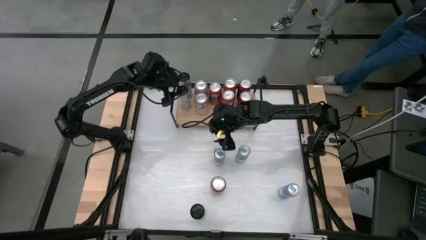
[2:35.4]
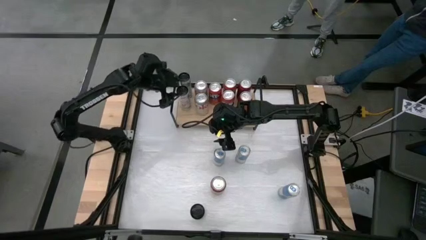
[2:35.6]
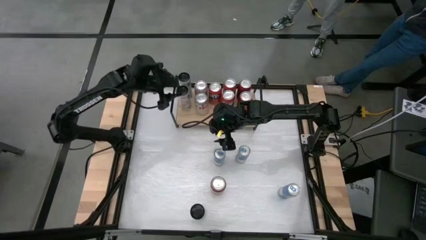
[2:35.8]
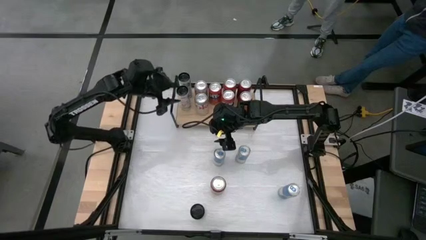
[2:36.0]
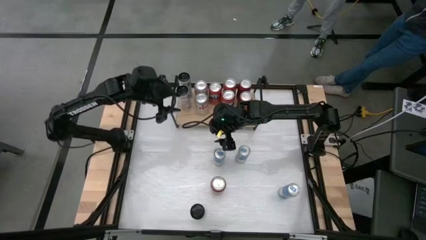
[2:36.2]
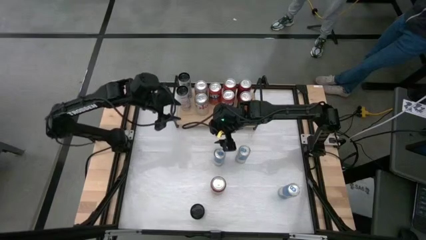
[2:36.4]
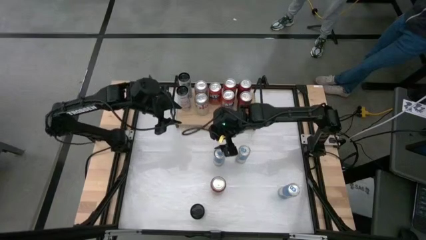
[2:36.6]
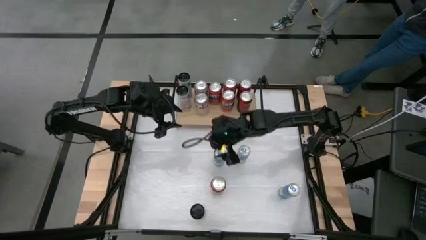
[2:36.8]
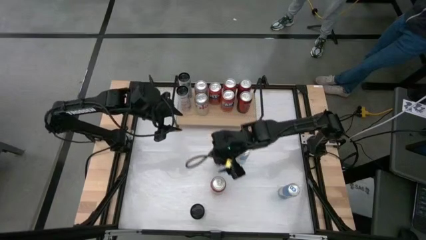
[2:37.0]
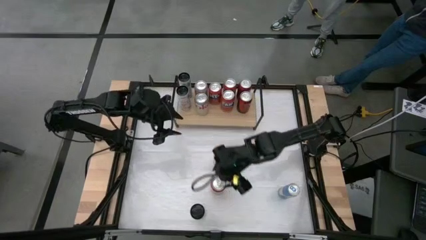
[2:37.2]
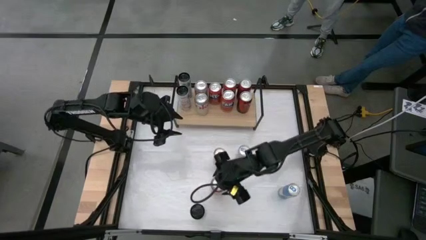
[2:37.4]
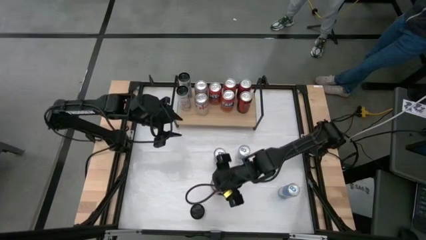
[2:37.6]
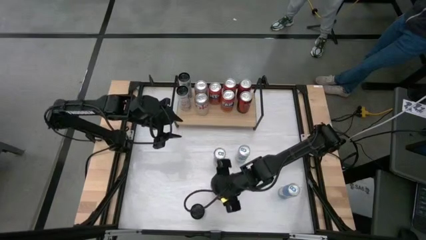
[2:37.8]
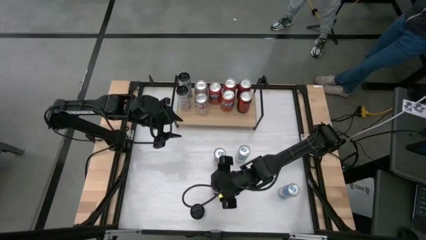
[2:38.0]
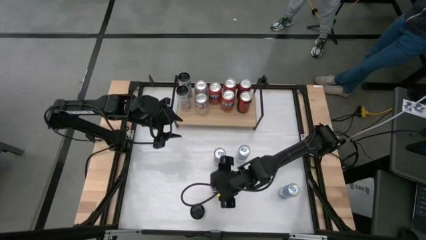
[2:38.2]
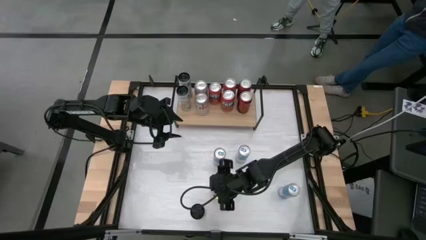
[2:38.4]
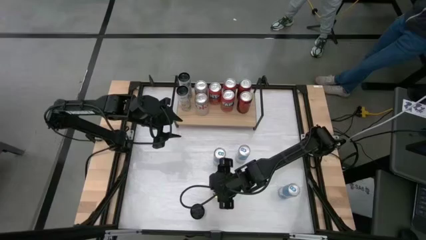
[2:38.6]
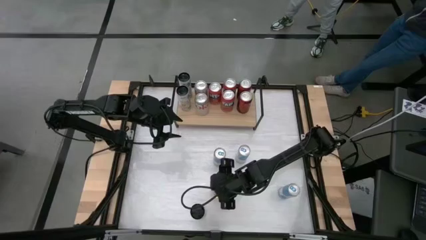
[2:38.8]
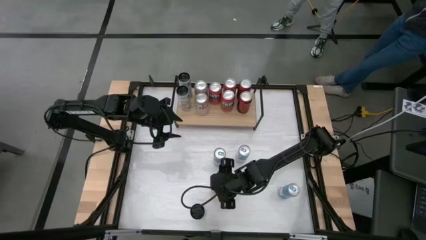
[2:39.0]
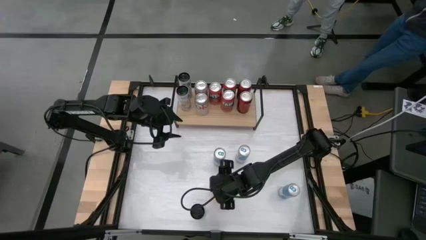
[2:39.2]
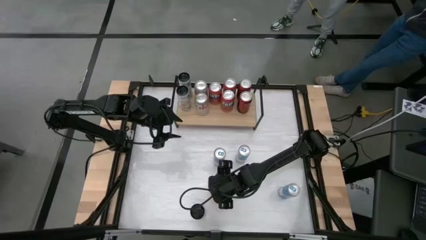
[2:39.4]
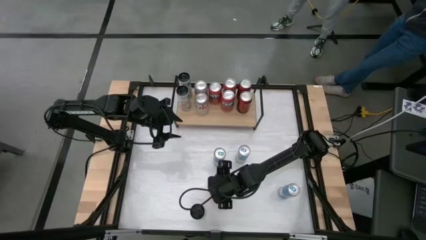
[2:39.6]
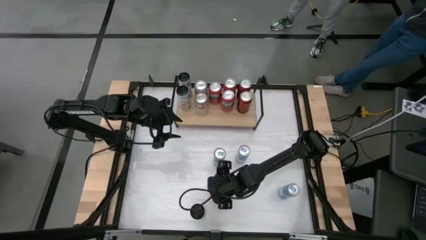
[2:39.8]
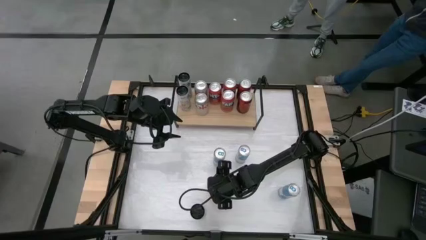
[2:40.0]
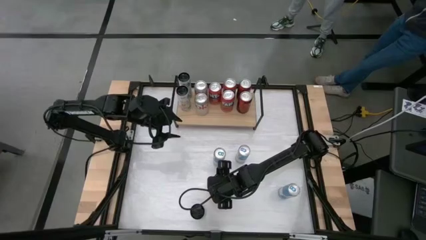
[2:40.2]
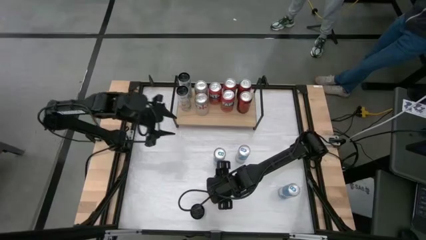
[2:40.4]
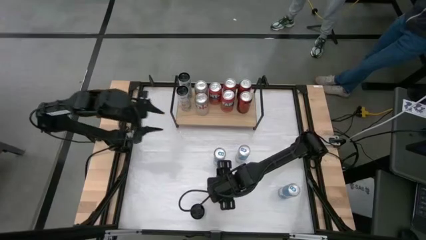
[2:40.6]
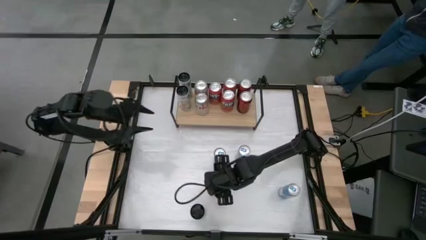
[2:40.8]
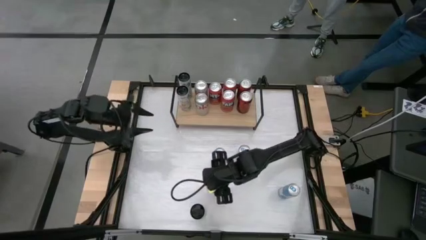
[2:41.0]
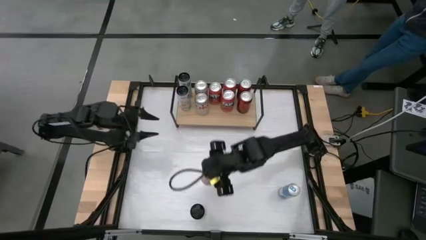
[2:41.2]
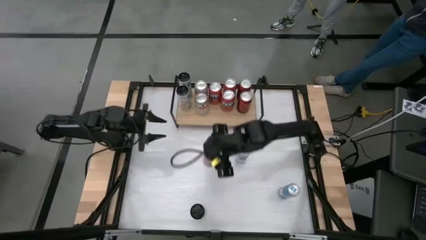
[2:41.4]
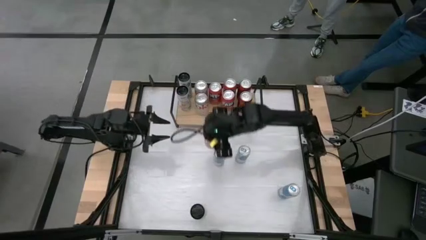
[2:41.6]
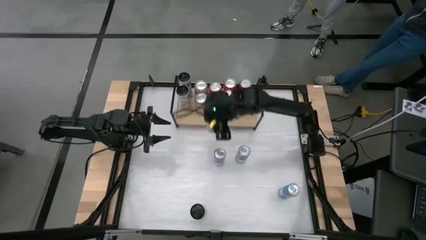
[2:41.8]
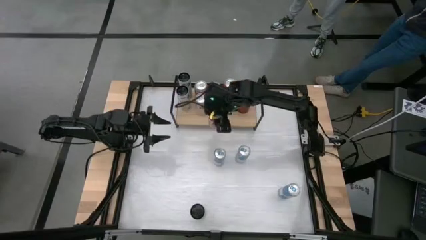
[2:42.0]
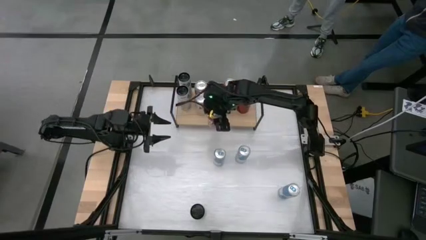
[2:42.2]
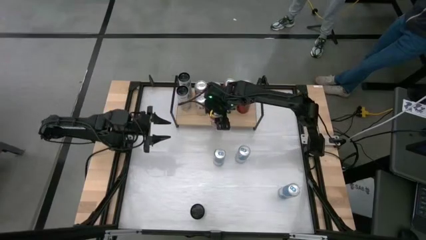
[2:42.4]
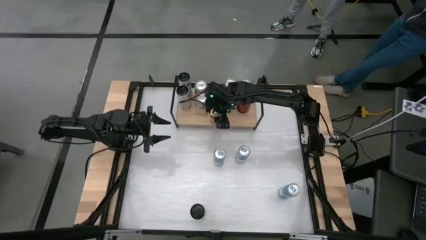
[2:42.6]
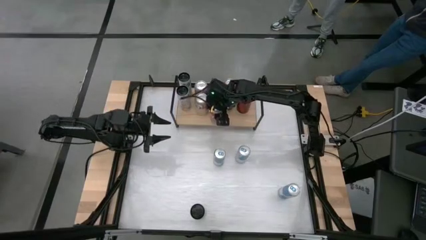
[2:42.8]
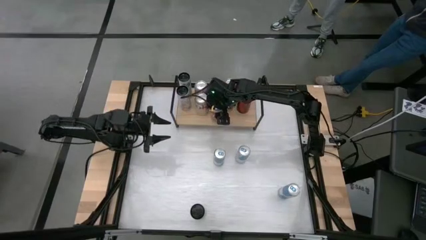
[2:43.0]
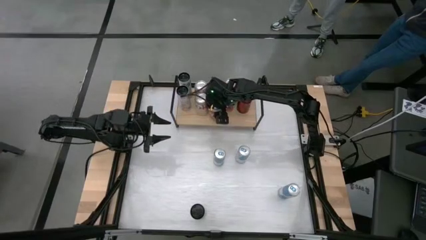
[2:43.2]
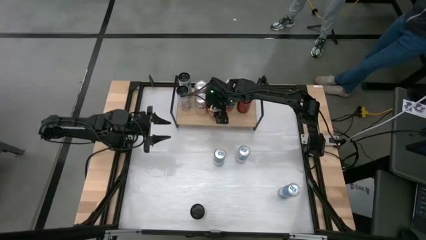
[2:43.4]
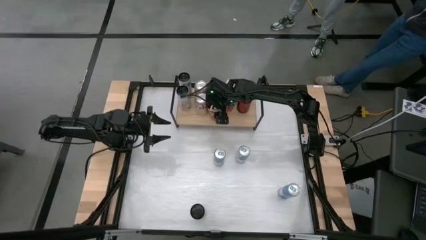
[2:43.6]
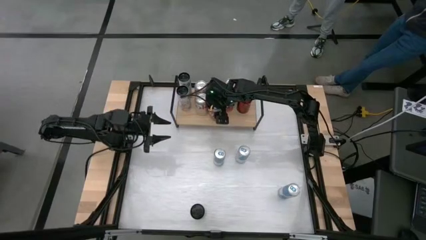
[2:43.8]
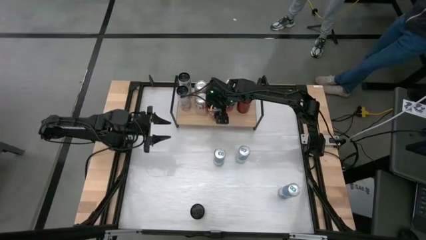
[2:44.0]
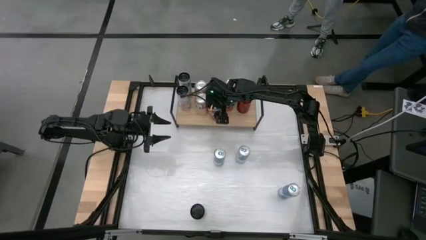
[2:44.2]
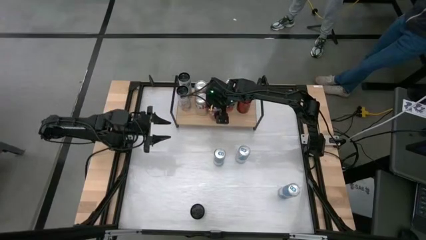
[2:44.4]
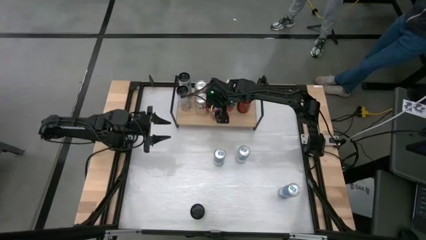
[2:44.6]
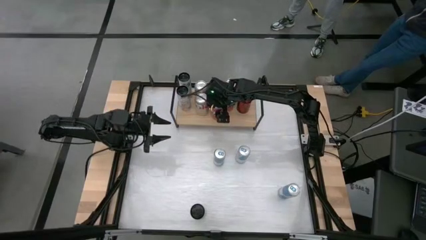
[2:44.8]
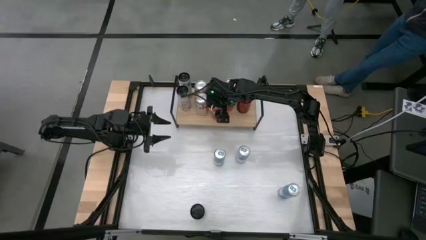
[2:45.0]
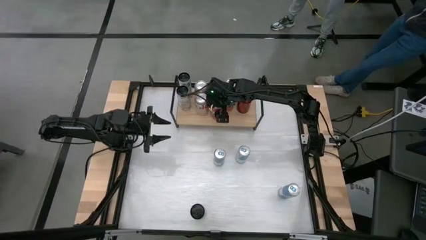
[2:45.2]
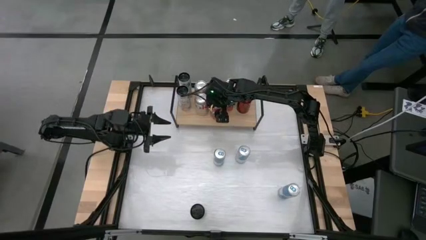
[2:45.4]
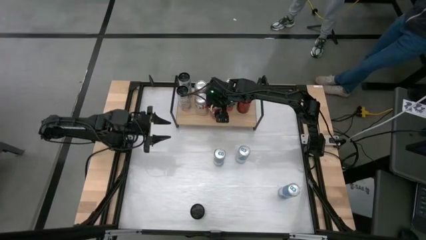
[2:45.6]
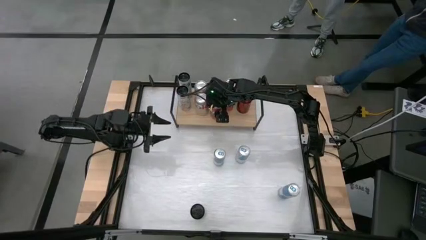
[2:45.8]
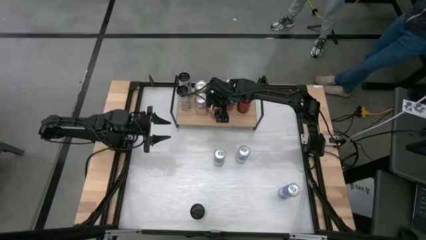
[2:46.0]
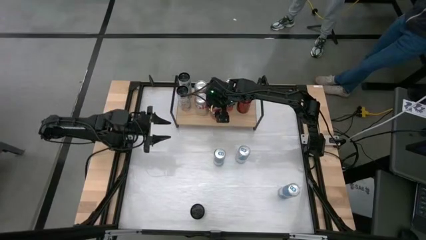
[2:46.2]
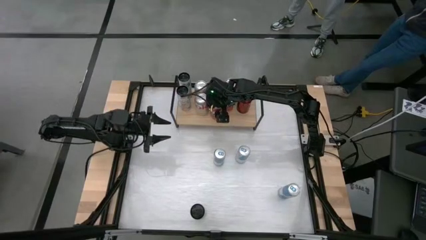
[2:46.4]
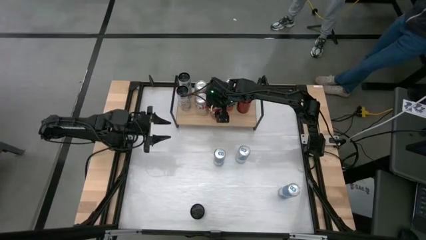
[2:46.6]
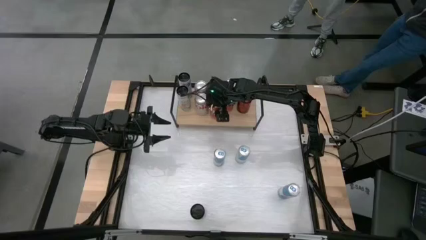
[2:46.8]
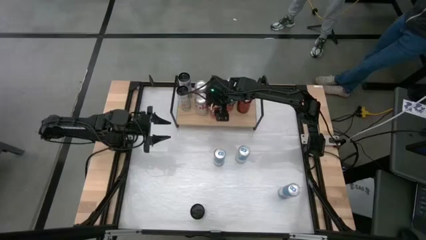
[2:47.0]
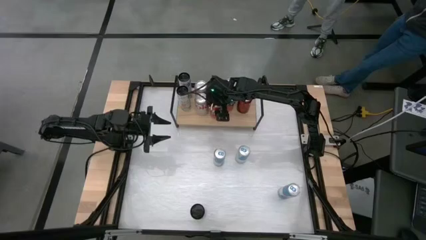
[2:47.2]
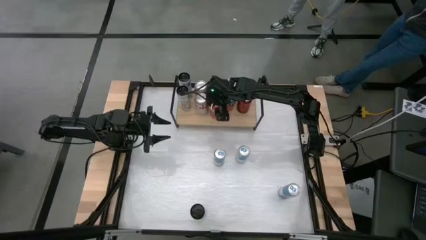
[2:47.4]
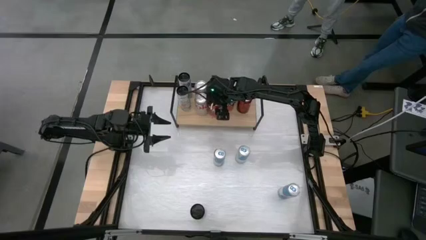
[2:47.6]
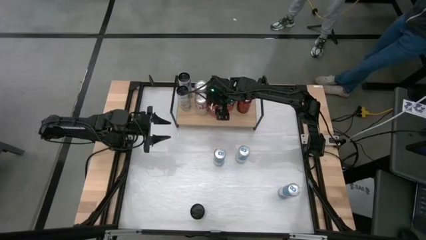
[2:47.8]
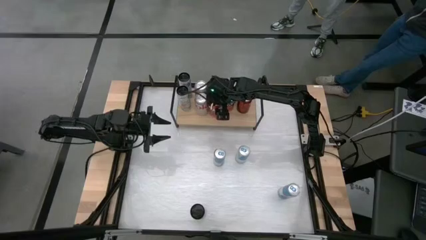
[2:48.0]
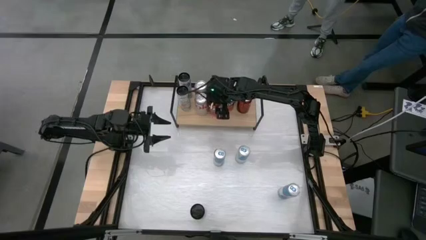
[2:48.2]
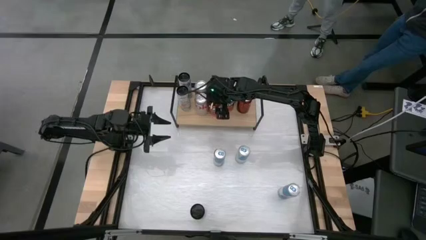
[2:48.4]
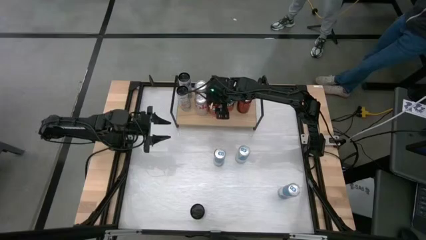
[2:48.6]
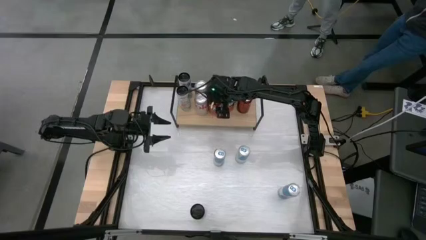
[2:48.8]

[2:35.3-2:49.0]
Task: Place canned beverage on shelf
Put the pink soda can on the shelf aligned with other pink soda can
